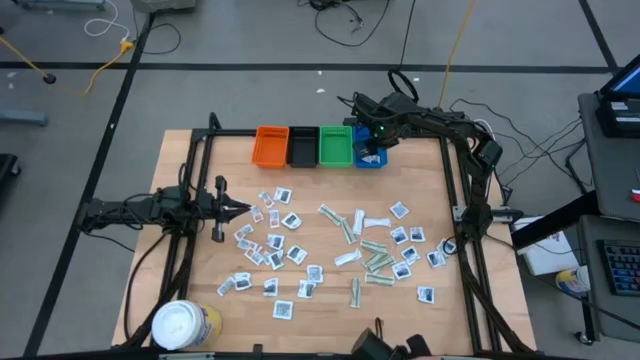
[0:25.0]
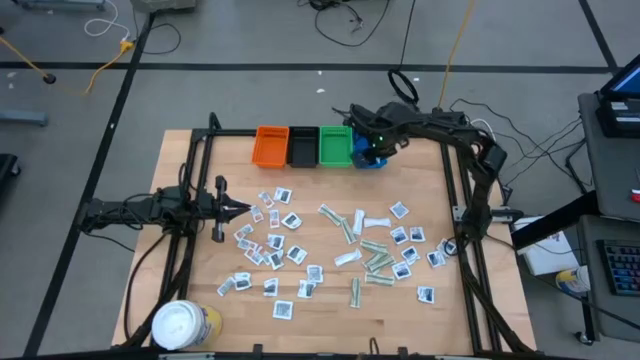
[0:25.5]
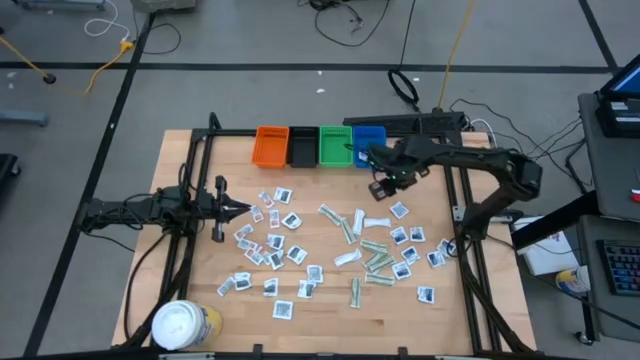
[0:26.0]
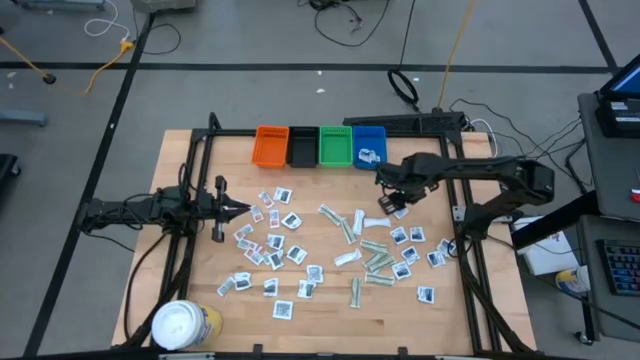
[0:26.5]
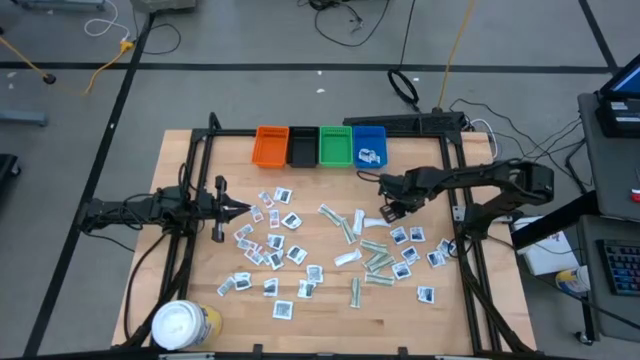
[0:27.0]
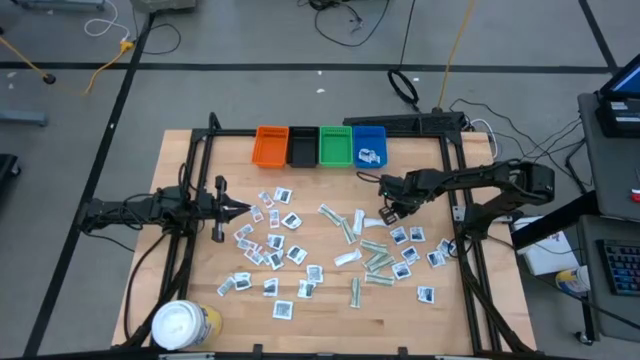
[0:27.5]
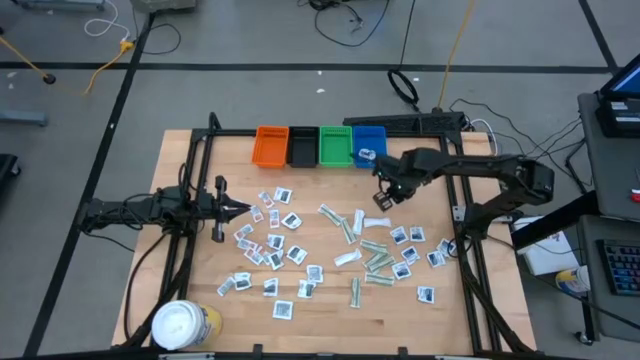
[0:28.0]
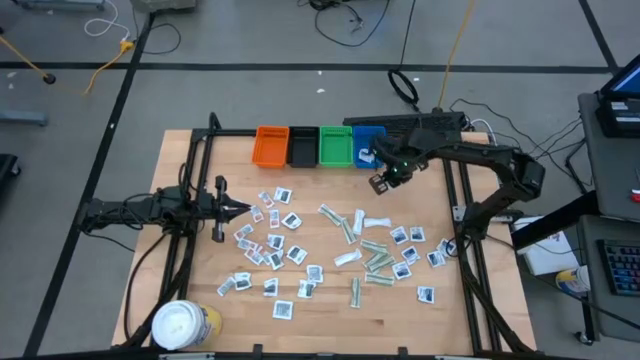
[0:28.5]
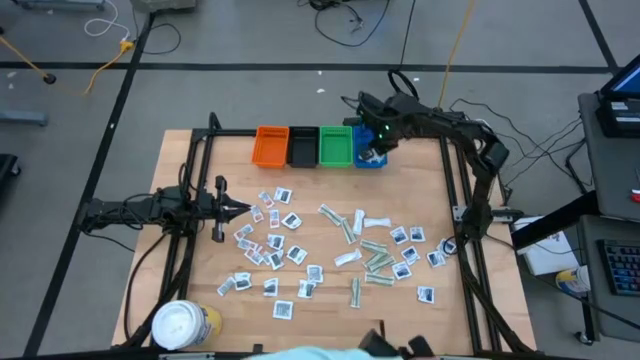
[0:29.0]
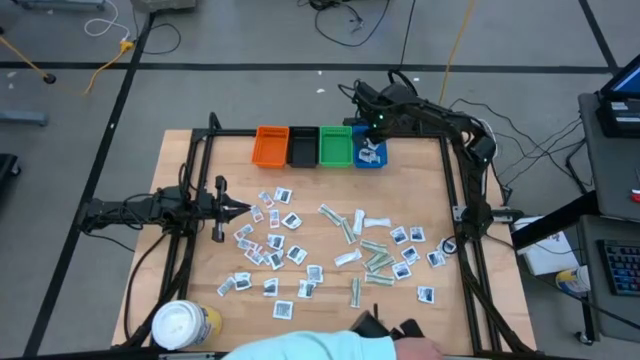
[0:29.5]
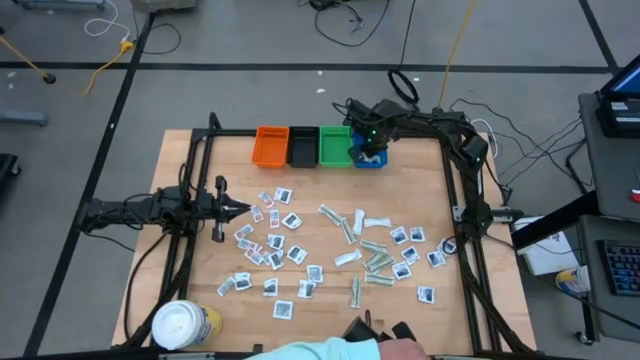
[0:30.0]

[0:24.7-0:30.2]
Task: Pick & Place First Aid Supplies
Put the blue packet into the blue bin

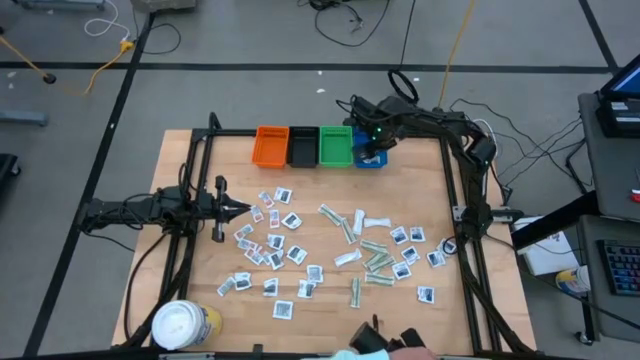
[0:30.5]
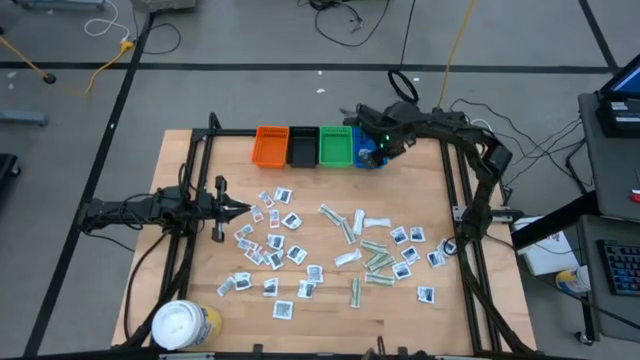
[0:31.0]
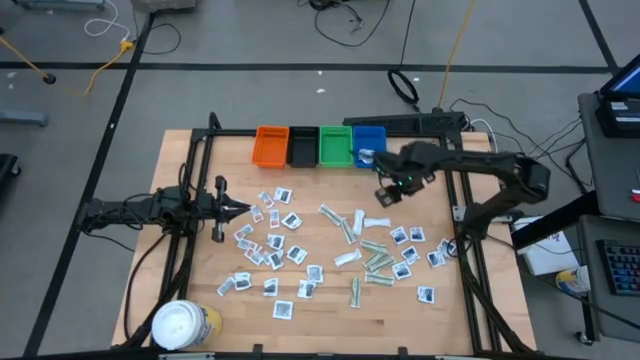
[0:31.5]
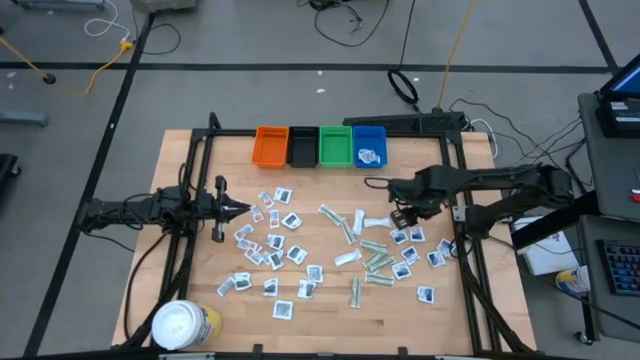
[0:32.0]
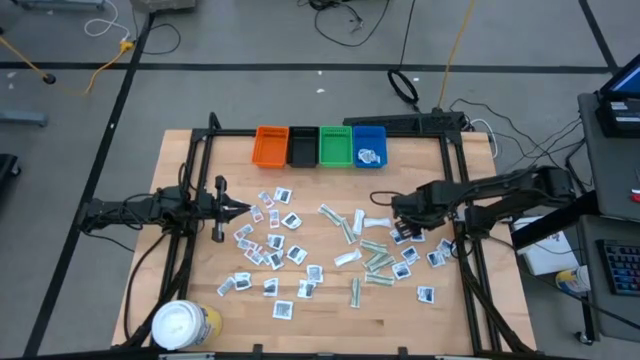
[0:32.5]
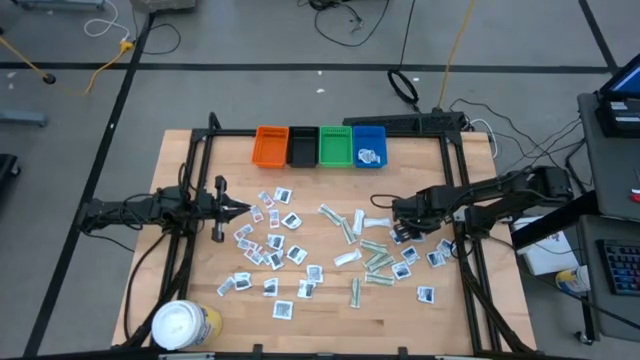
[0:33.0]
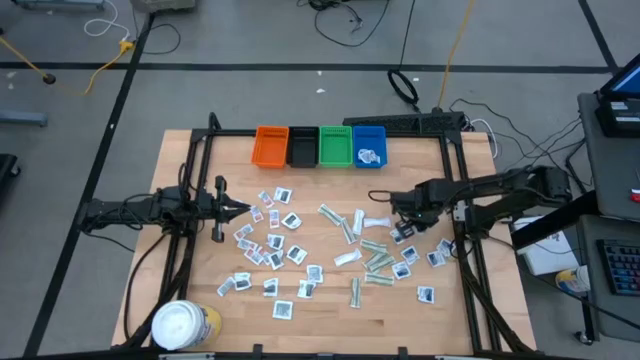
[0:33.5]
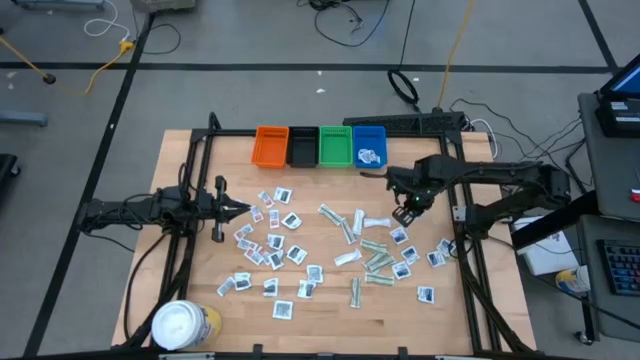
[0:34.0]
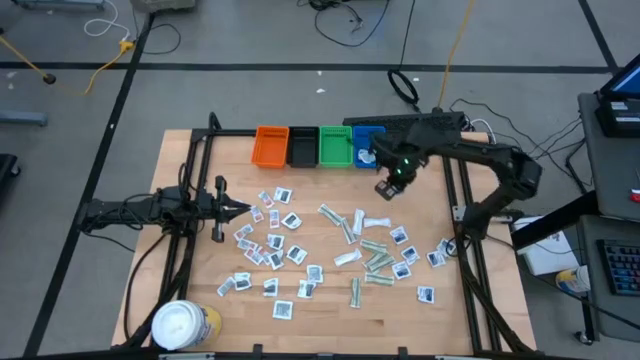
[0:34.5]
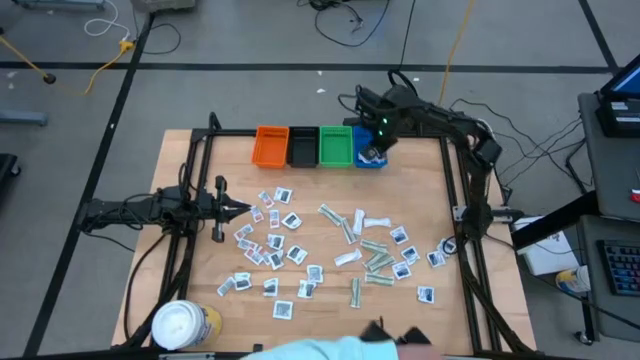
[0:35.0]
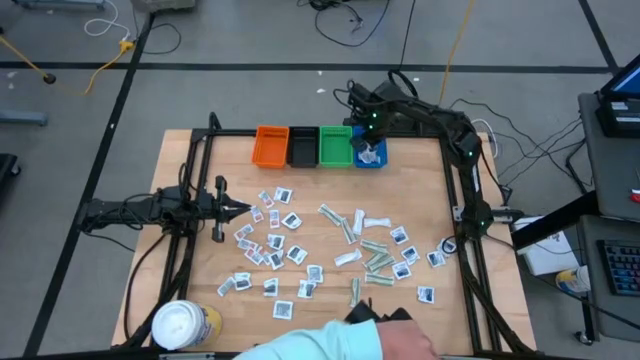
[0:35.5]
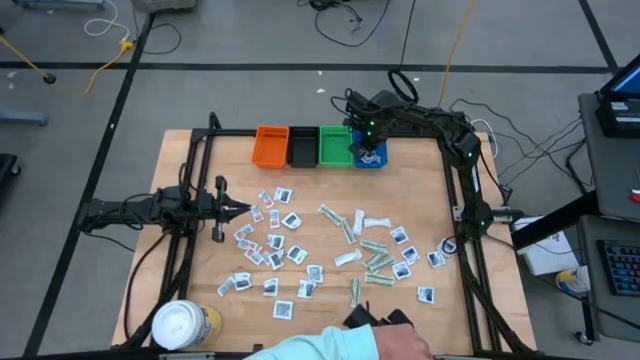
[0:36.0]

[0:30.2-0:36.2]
Put the blue packet into the blue bin

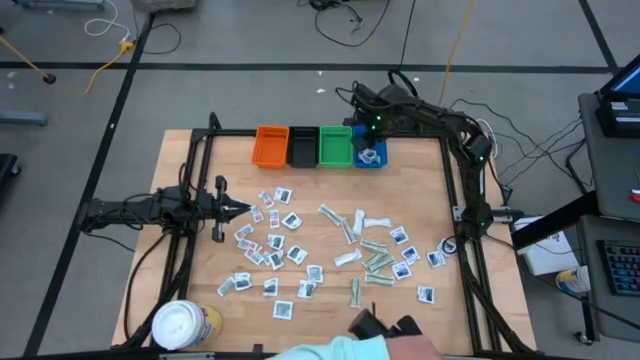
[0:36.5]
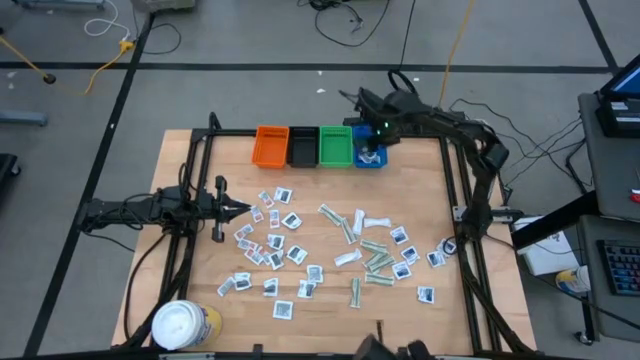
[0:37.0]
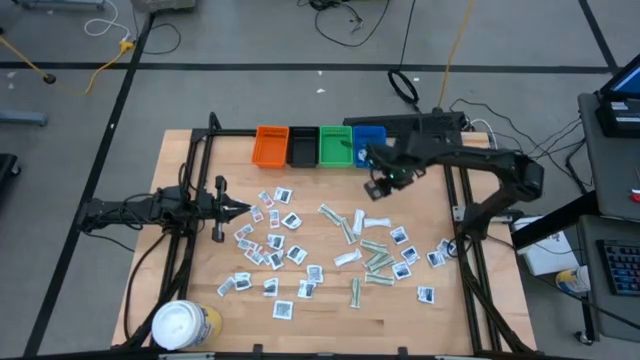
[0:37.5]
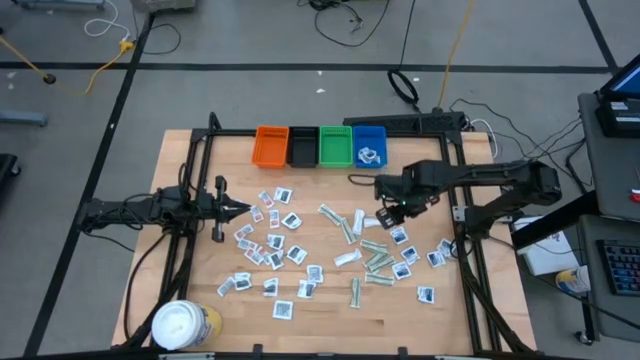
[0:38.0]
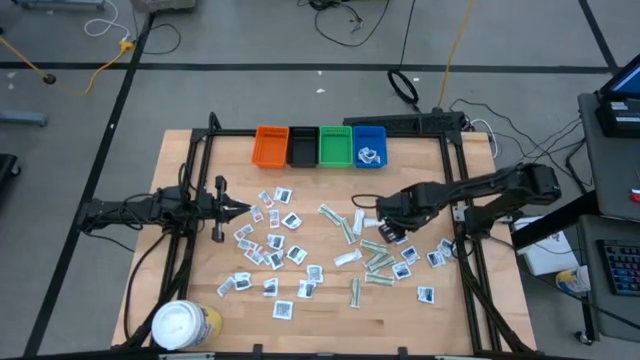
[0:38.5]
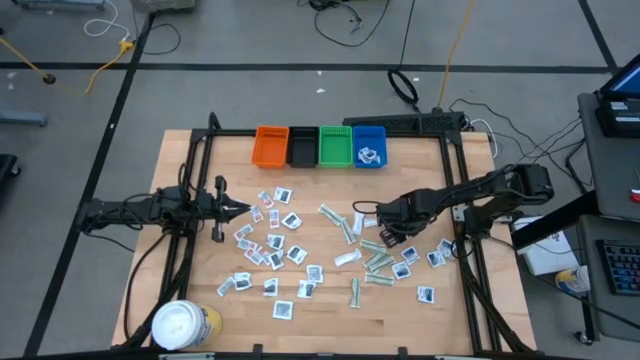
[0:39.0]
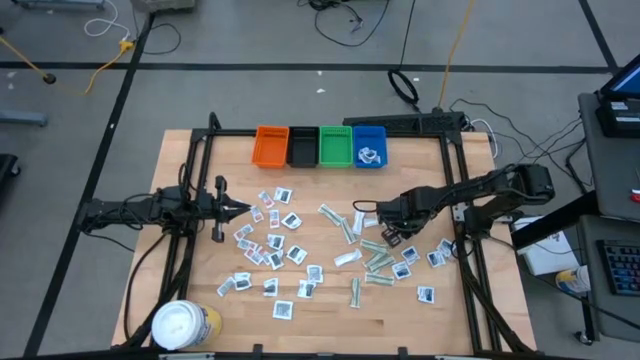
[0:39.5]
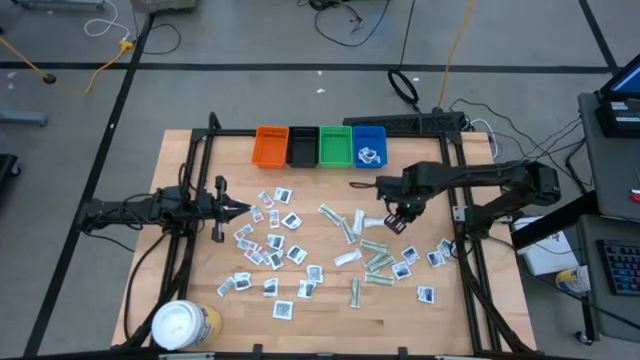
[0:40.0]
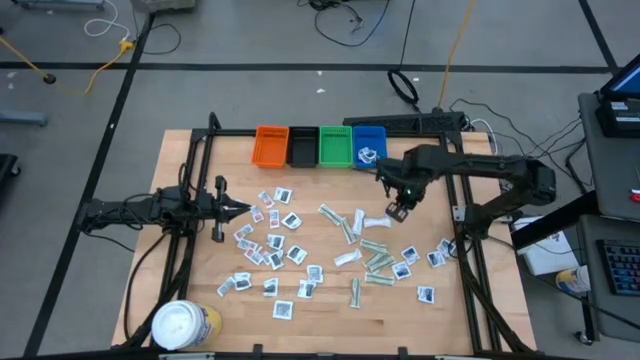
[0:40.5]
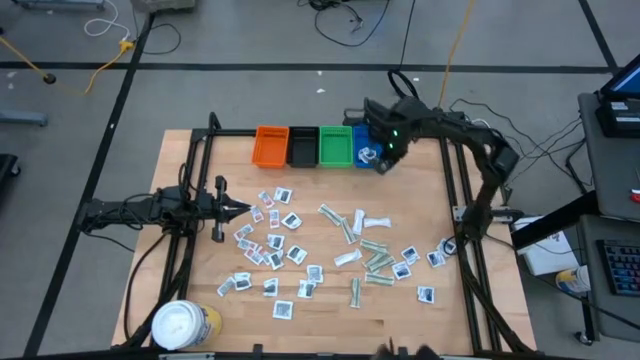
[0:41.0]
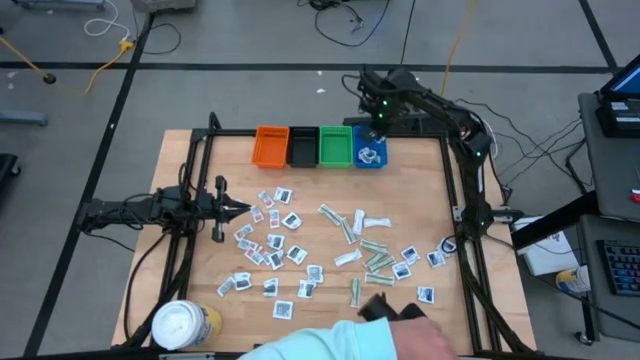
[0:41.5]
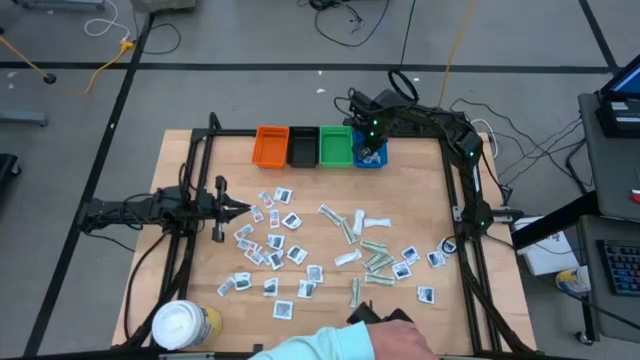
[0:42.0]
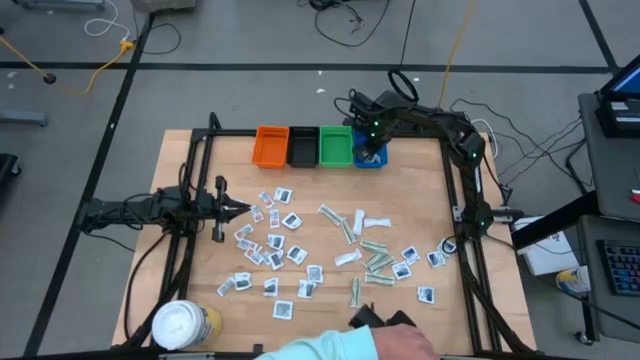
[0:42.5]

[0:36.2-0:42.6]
Put the blue packet into the blue bin

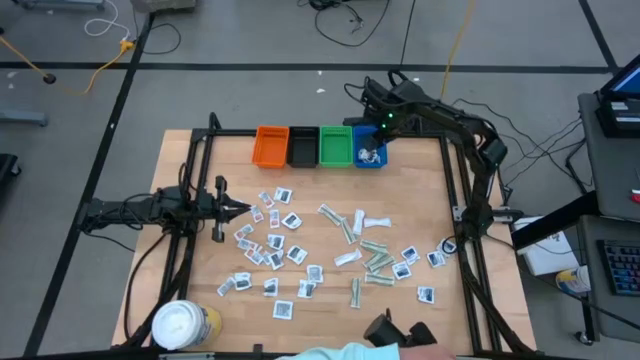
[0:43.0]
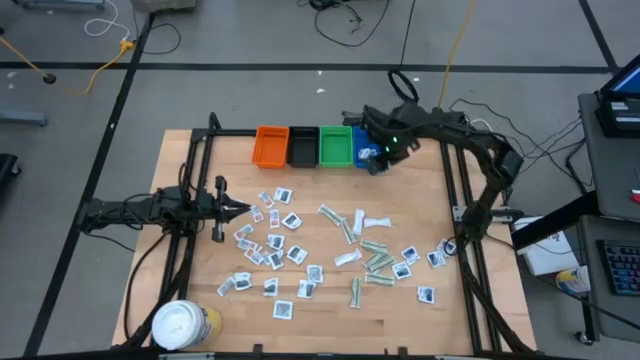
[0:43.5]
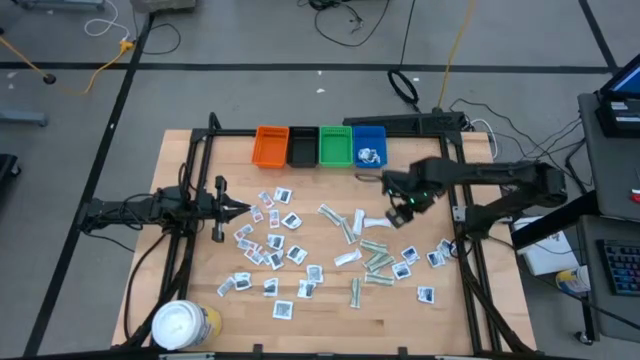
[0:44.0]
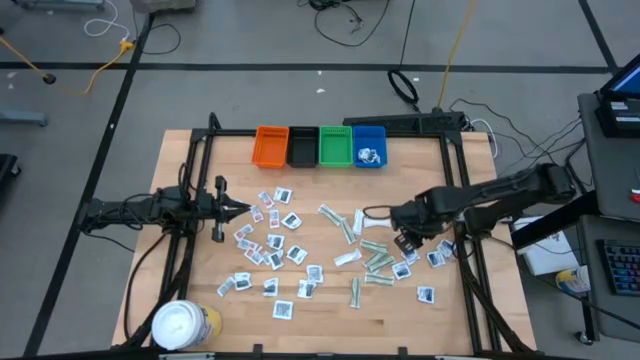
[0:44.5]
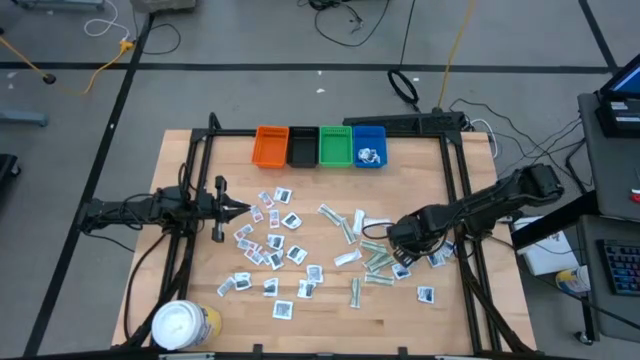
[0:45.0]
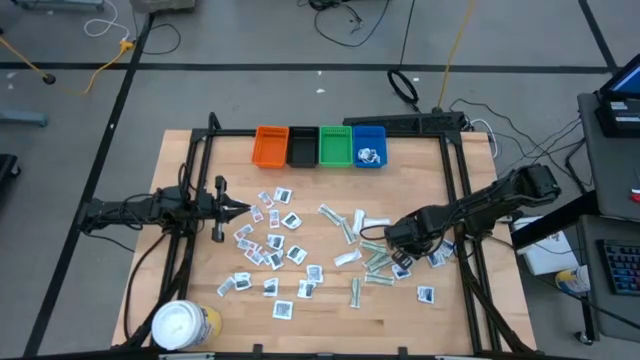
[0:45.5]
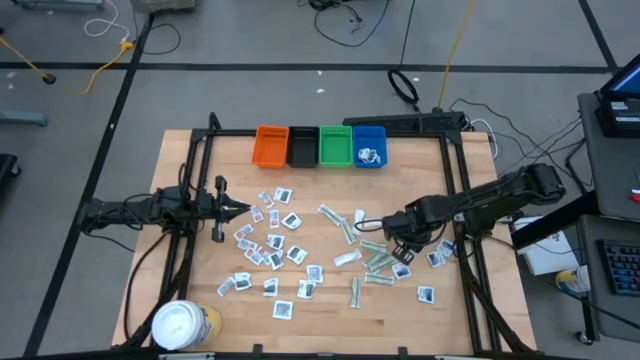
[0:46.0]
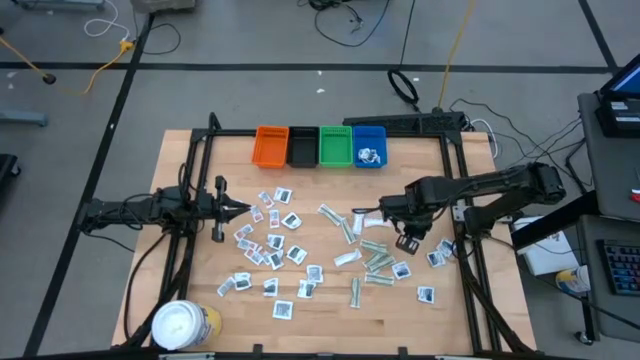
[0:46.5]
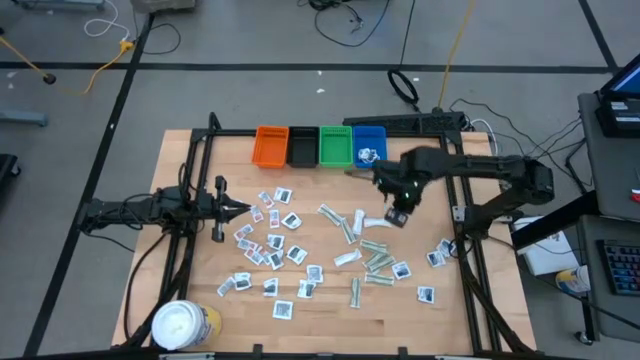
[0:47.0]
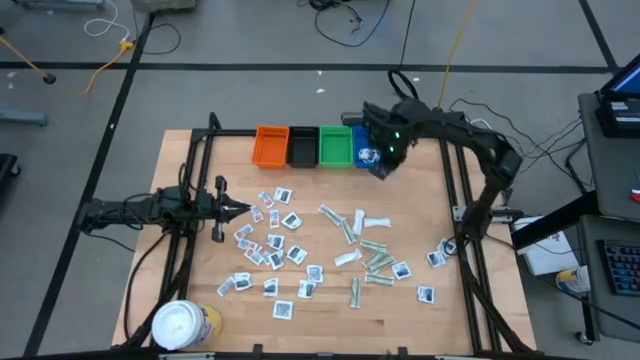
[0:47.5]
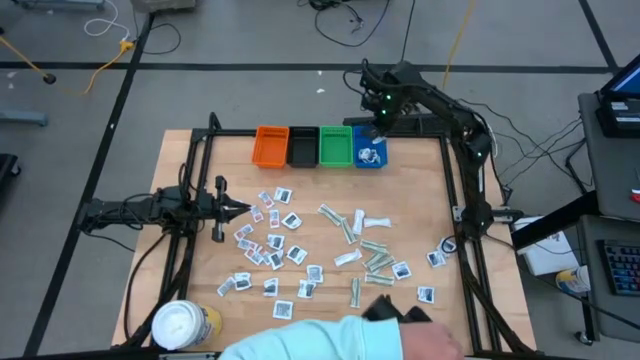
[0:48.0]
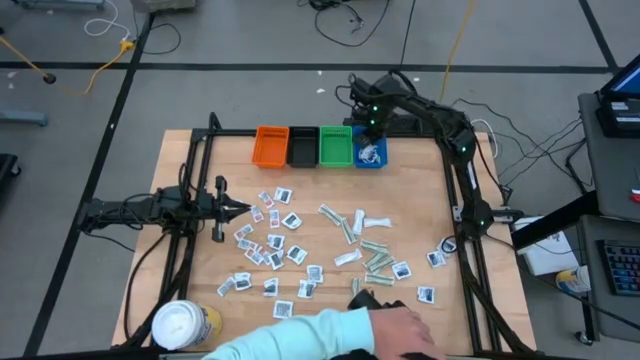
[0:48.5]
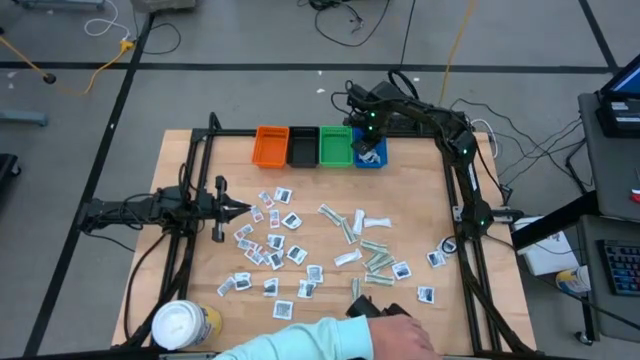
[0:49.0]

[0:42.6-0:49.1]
Put the blue packet into the blue bin
